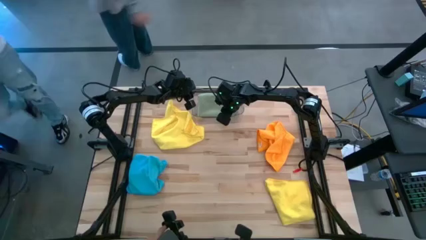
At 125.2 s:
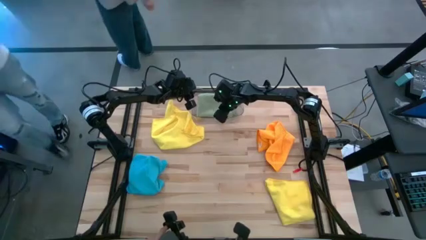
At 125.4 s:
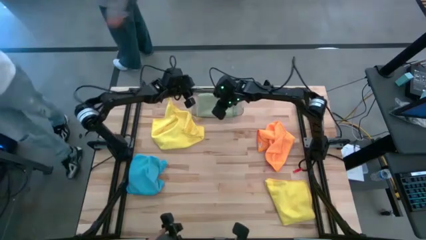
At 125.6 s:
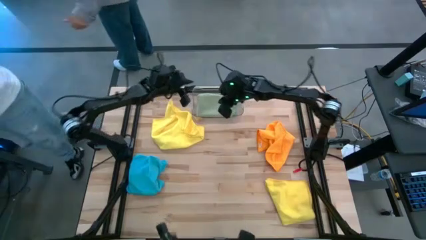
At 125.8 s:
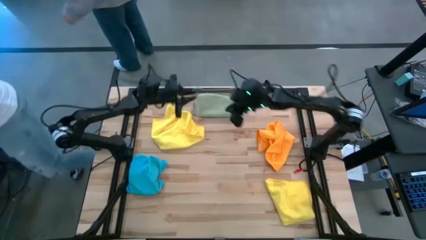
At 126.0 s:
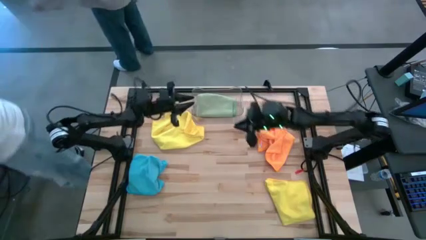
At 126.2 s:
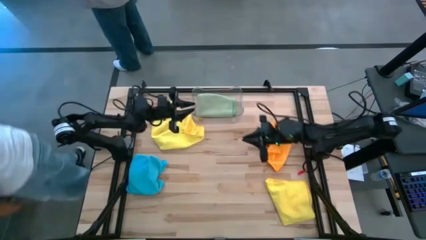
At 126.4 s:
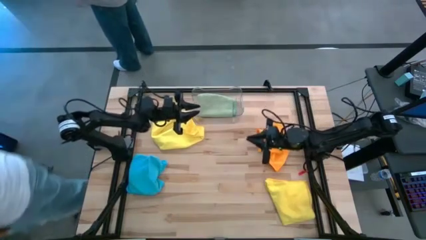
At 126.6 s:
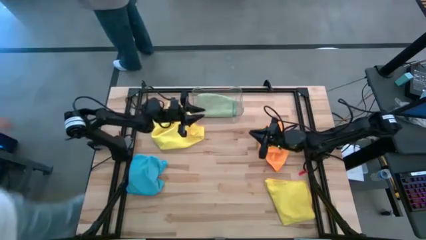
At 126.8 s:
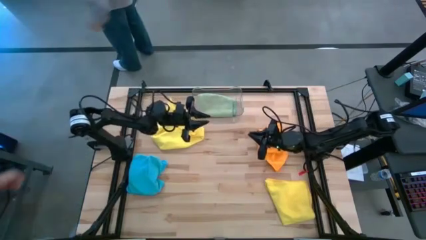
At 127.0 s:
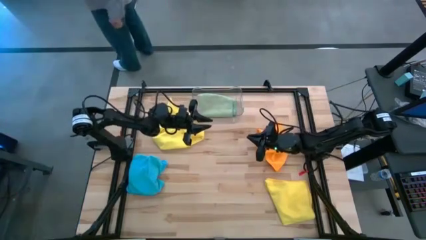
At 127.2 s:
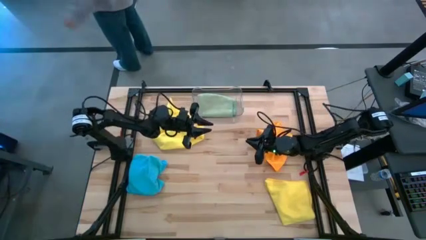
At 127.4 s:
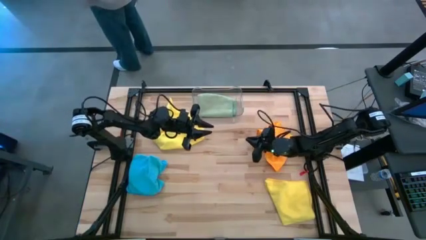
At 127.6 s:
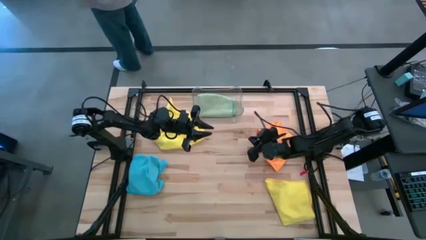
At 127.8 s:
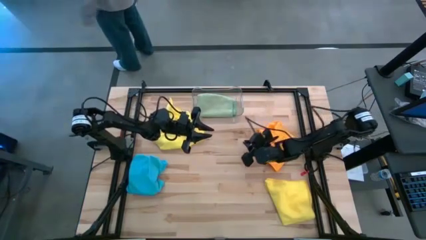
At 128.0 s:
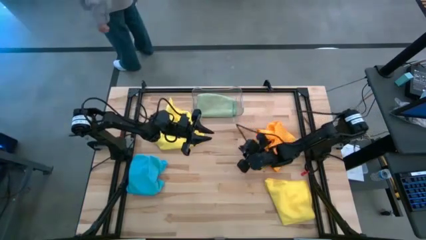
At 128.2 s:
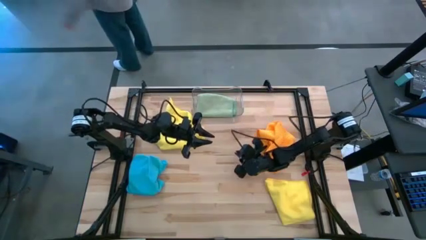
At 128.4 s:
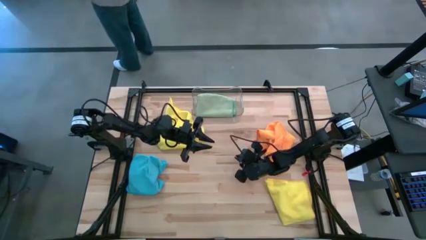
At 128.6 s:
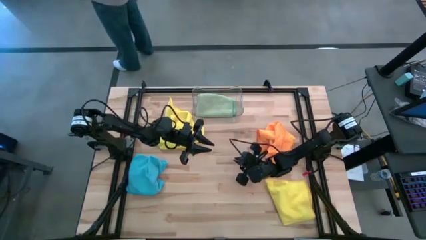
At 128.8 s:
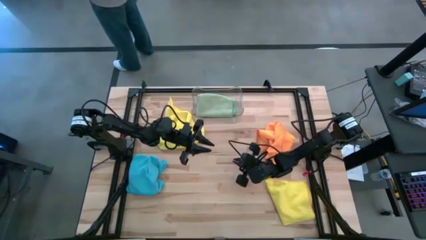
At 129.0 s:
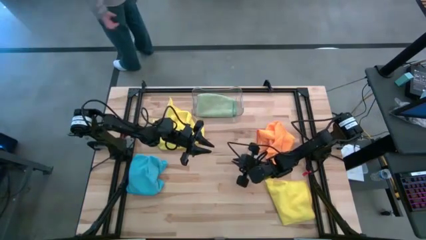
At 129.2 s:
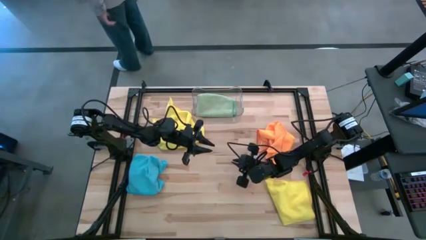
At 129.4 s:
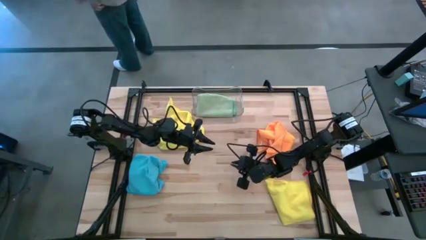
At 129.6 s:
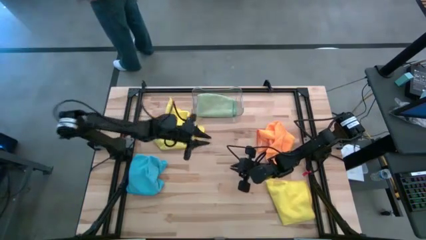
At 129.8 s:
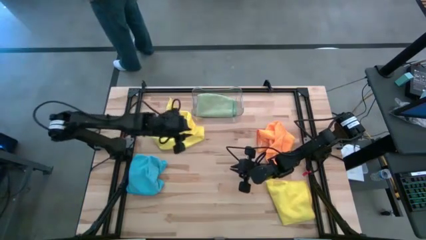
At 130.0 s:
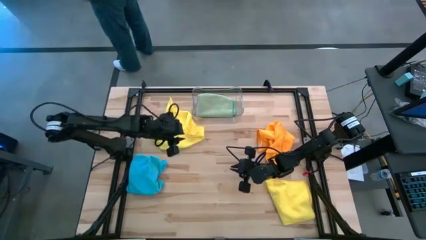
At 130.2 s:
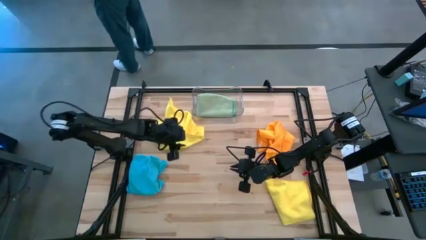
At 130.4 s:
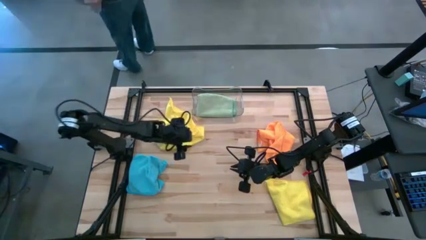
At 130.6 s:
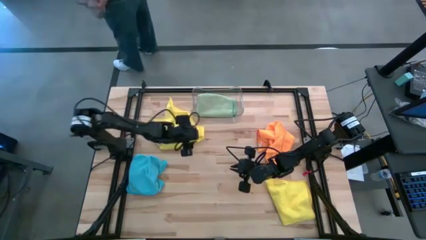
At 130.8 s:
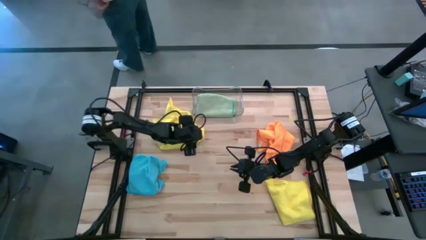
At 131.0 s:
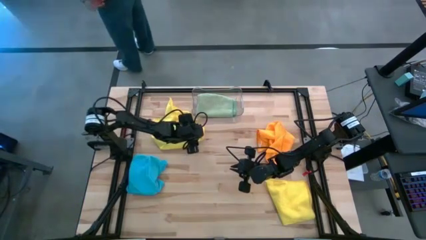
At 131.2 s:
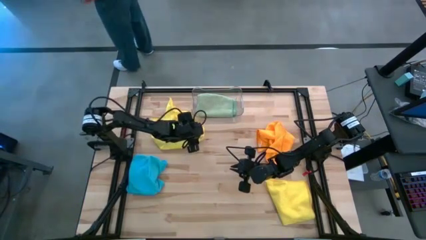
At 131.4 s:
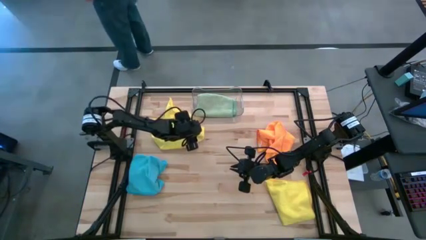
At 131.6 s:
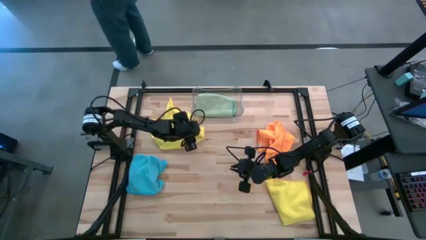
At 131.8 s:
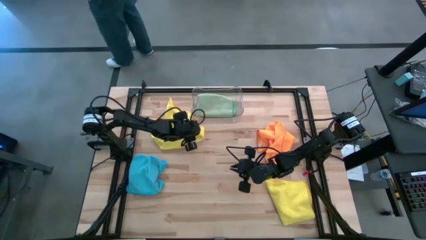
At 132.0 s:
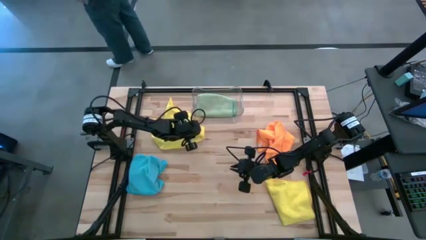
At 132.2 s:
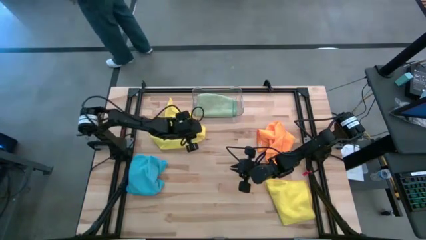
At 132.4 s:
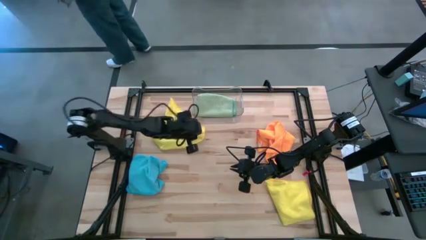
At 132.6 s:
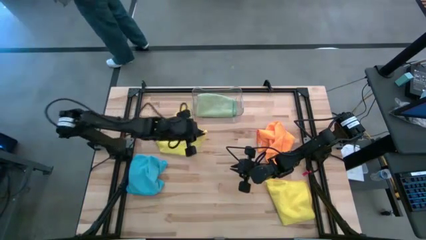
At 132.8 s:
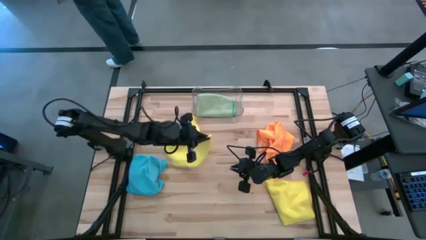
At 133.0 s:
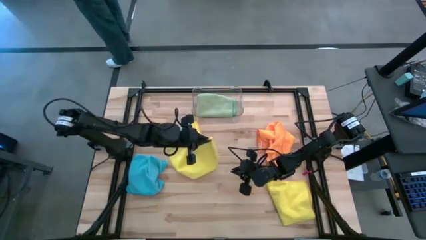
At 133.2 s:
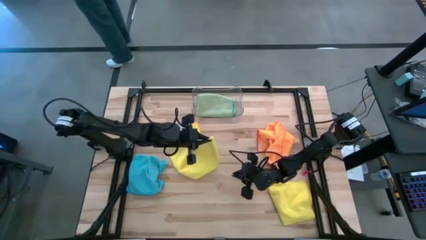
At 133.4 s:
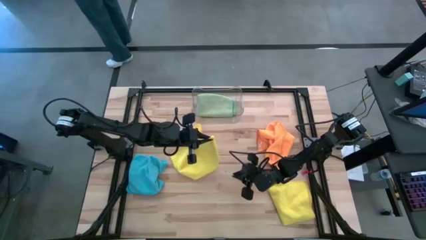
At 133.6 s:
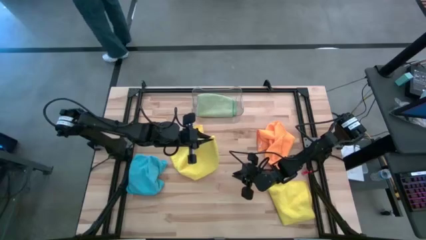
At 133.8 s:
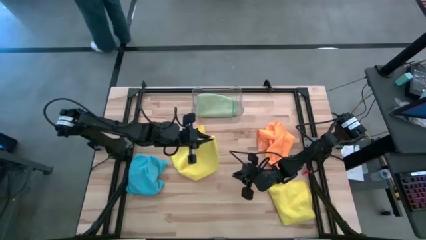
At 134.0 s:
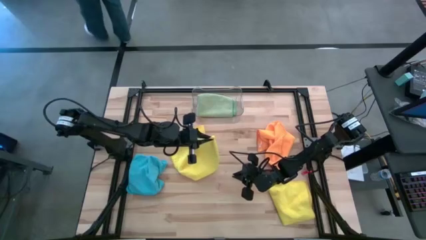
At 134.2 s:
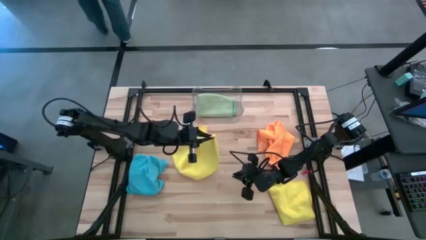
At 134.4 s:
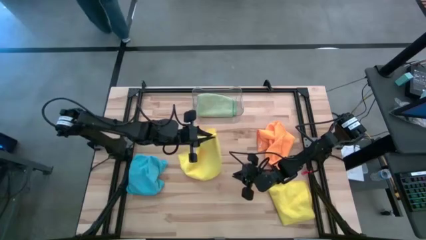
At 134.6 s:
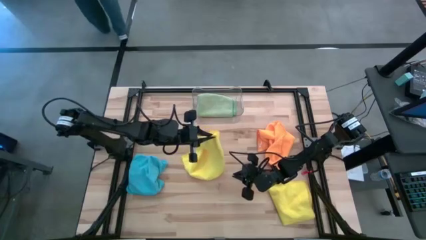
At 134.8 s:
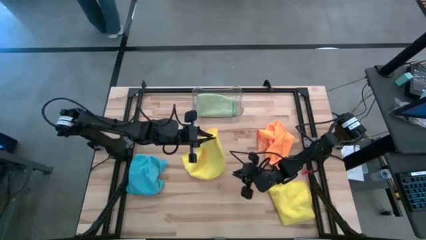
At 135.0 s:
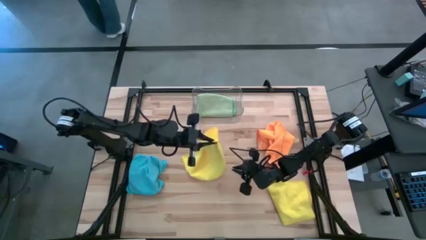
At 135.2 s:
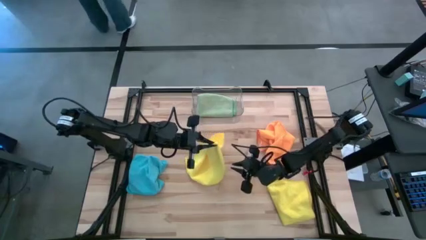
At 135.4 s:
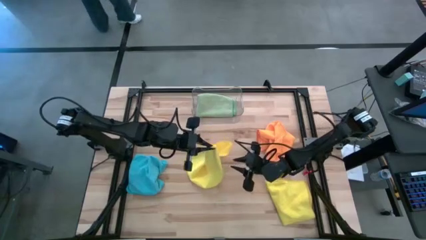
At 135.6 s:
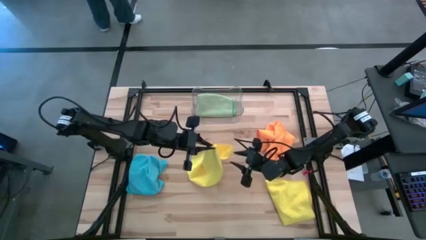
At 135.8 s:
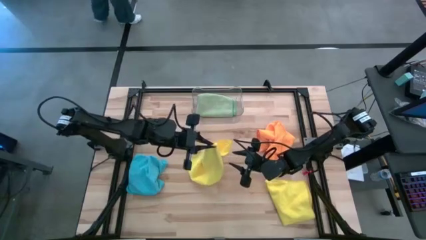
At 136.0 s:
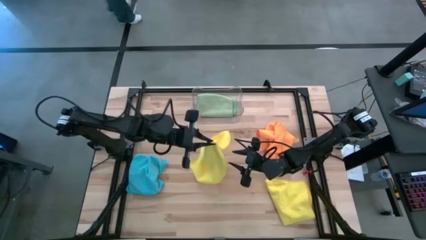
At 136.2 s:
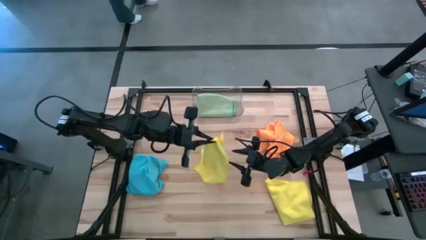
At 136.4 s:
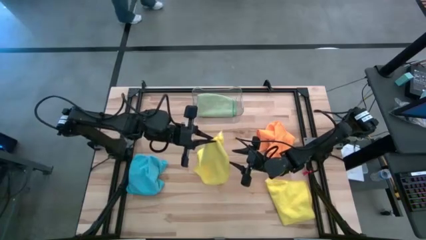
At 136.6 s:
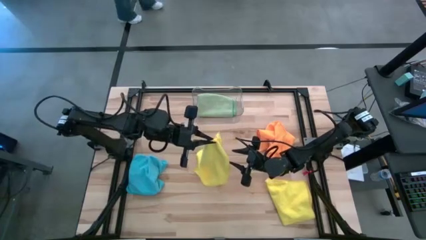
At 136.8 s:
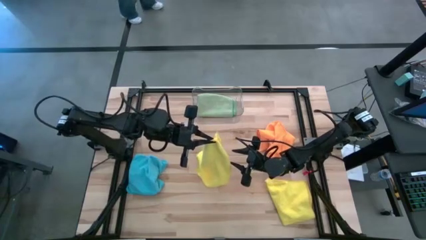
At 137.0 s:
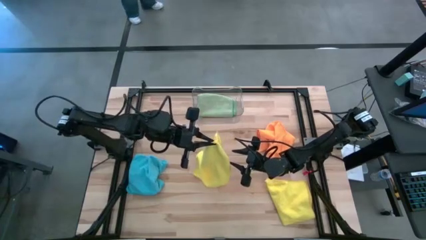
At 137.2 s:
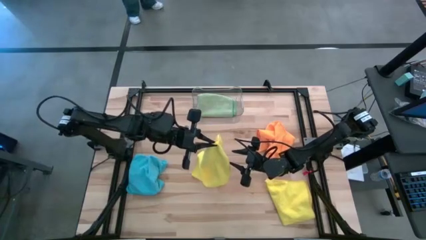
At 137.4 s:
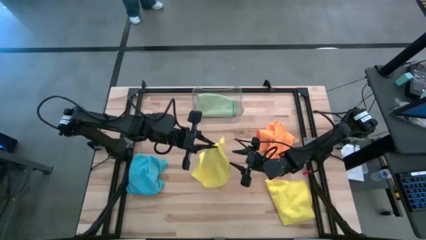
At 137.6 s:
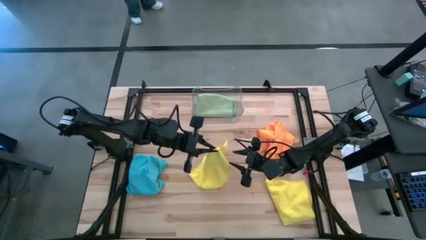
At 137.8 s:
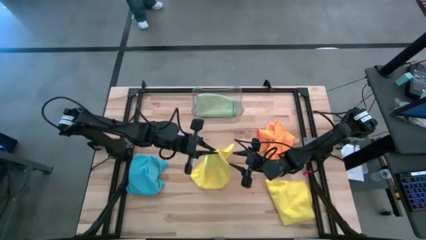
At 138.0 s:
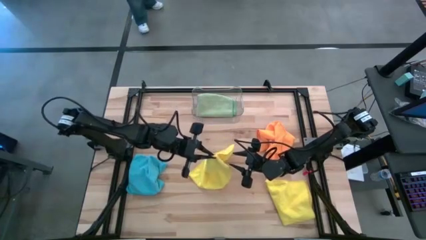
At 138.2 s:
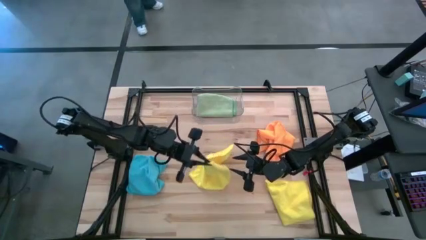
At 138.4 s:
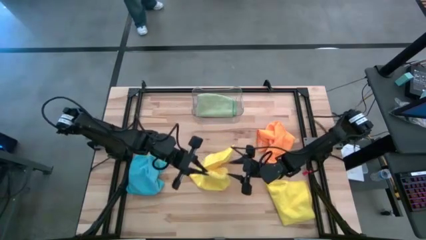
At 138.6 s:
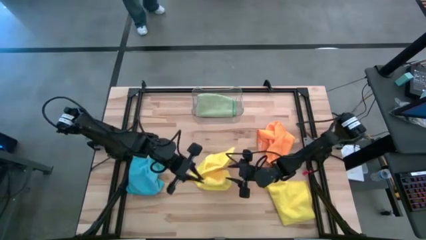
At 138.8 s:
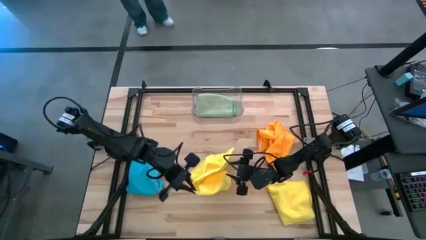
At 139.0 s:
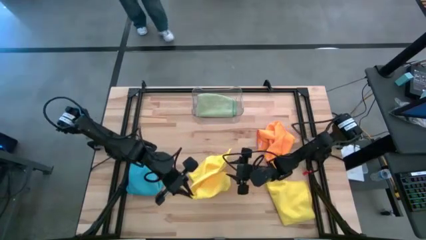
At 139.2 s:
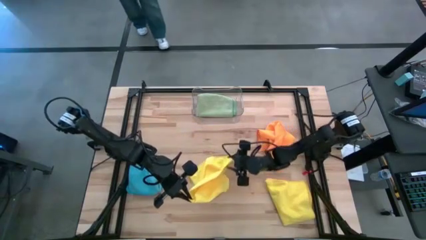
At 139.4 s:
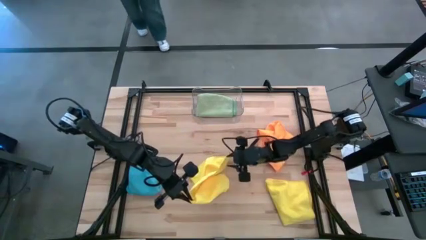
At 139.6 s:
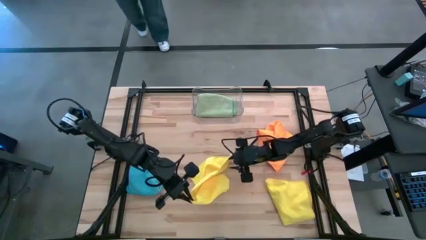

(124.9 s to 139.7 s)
Task: Fold microfiber towels
Fold the top yellow microfiber cloth
